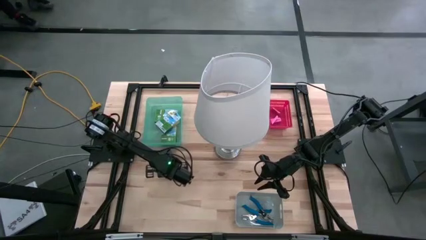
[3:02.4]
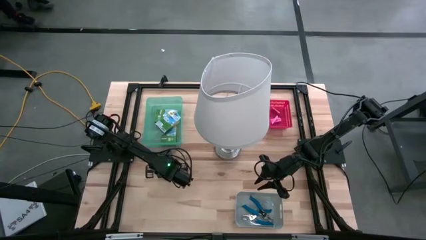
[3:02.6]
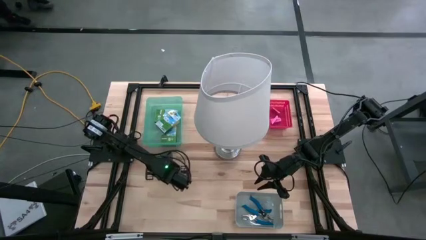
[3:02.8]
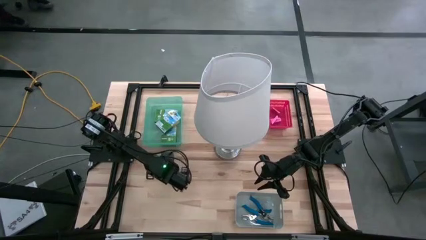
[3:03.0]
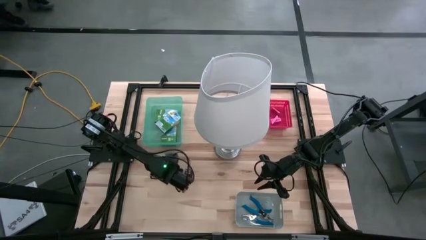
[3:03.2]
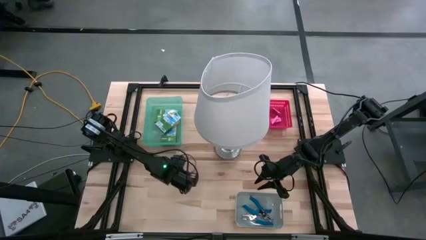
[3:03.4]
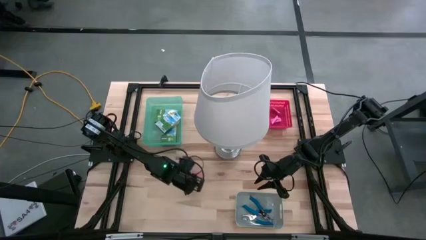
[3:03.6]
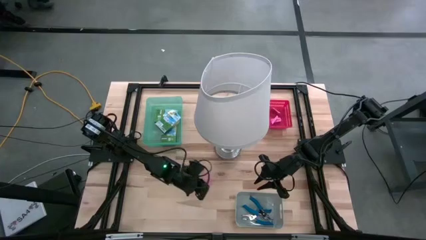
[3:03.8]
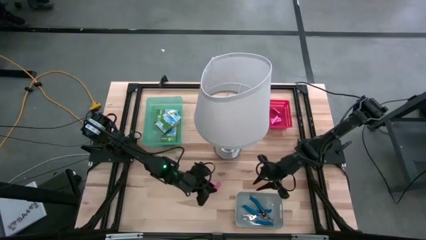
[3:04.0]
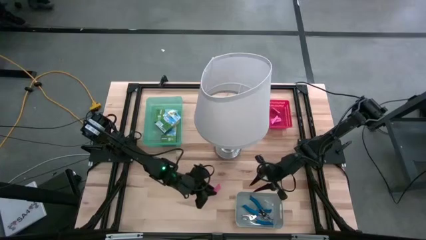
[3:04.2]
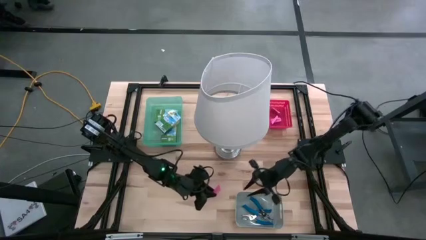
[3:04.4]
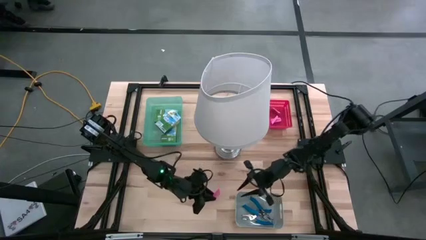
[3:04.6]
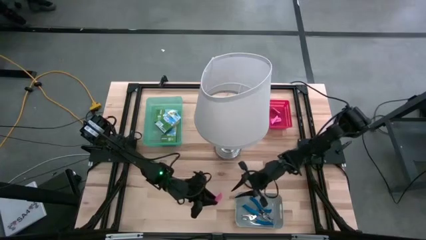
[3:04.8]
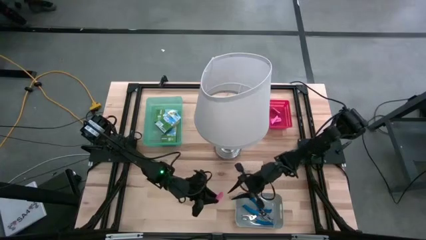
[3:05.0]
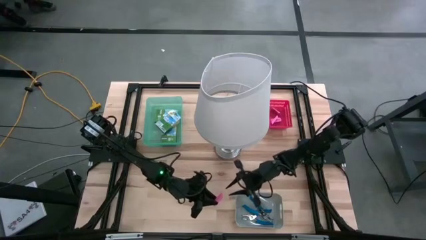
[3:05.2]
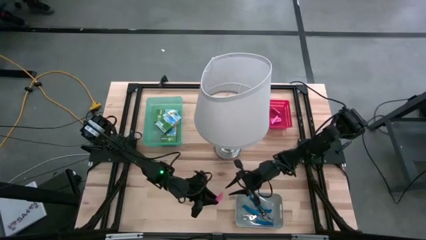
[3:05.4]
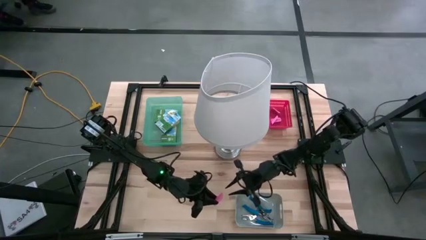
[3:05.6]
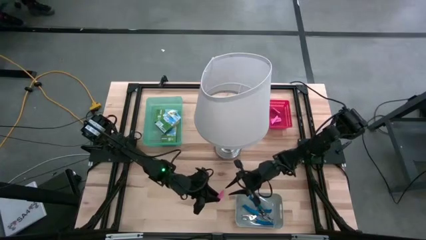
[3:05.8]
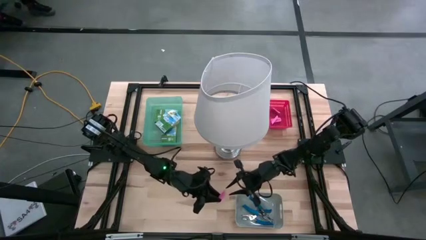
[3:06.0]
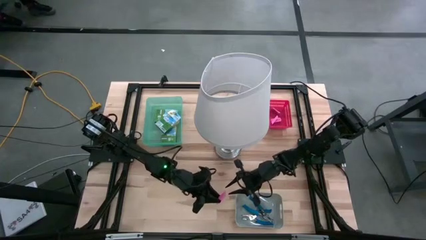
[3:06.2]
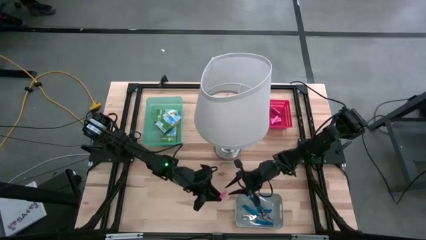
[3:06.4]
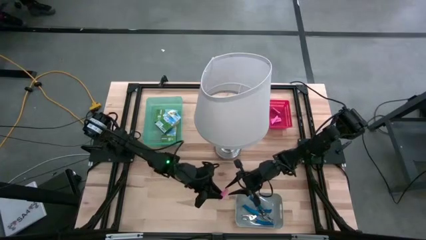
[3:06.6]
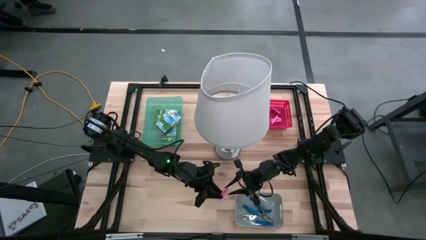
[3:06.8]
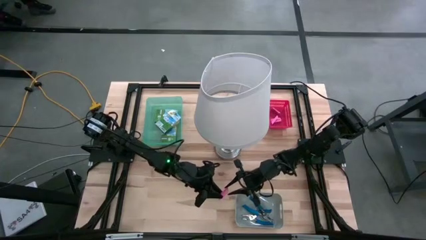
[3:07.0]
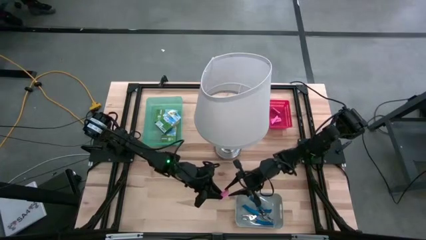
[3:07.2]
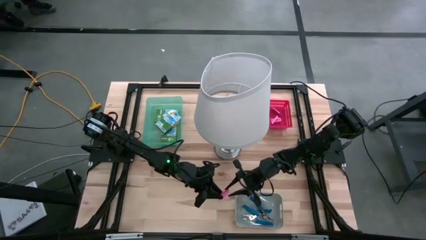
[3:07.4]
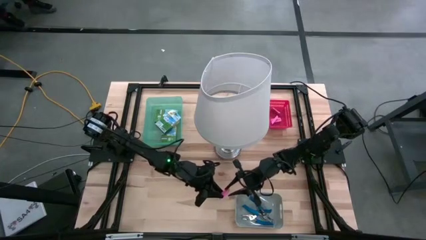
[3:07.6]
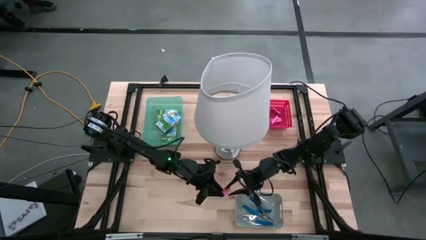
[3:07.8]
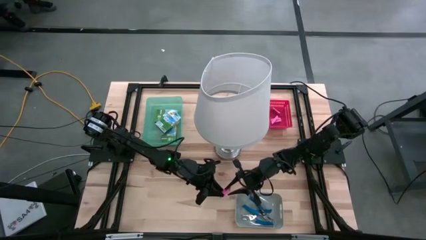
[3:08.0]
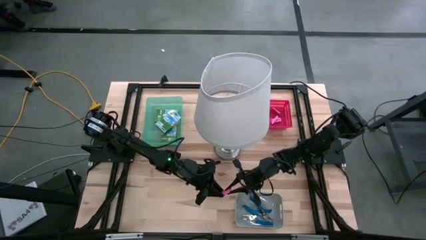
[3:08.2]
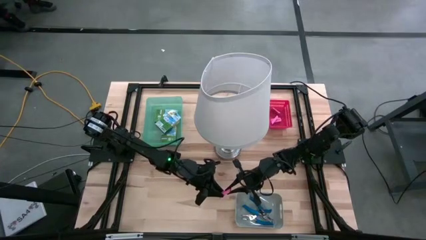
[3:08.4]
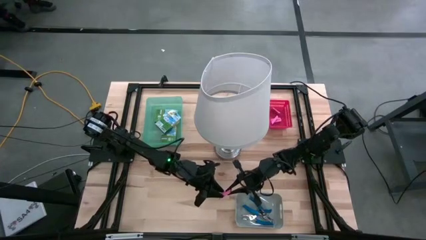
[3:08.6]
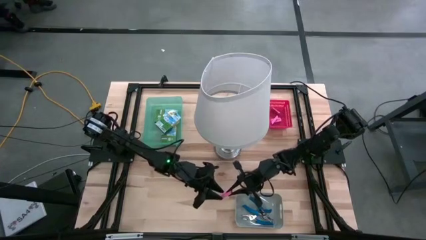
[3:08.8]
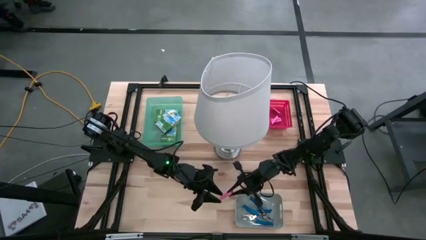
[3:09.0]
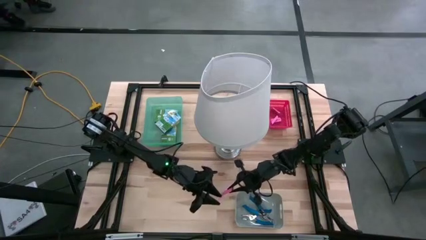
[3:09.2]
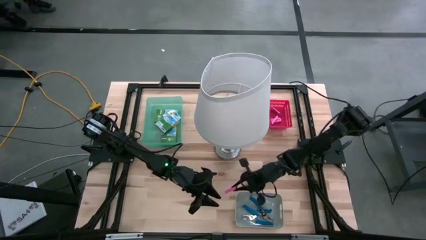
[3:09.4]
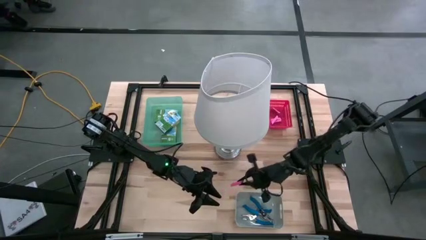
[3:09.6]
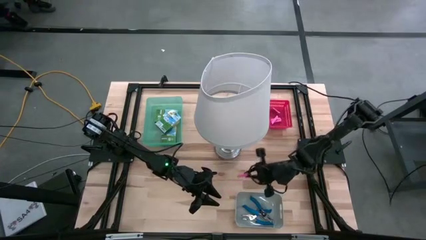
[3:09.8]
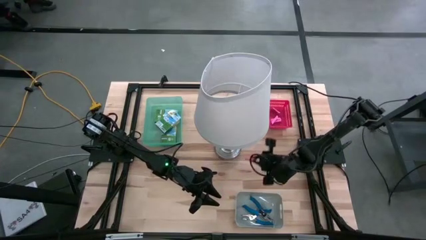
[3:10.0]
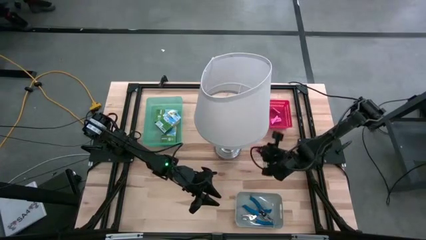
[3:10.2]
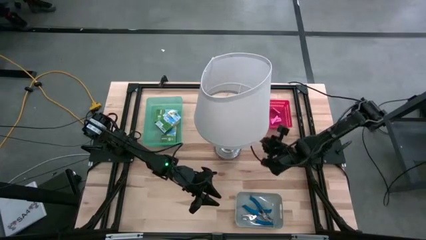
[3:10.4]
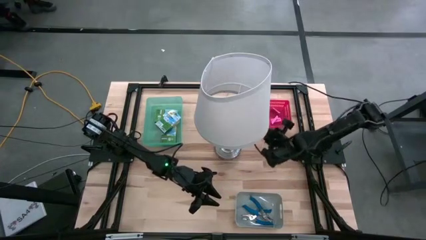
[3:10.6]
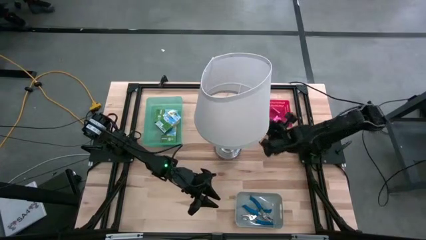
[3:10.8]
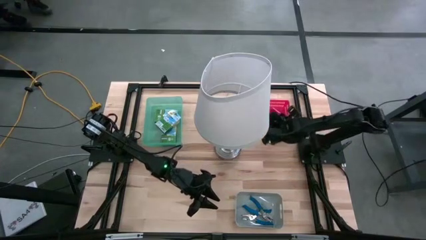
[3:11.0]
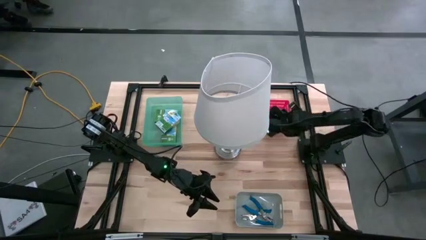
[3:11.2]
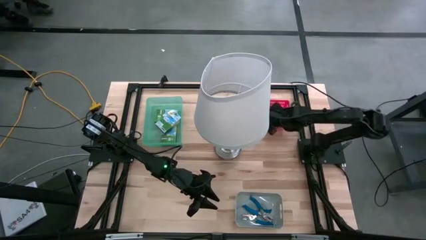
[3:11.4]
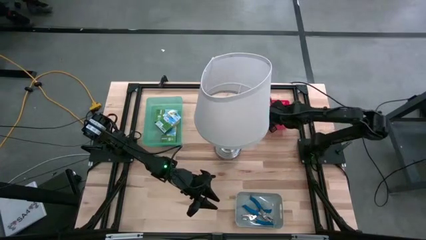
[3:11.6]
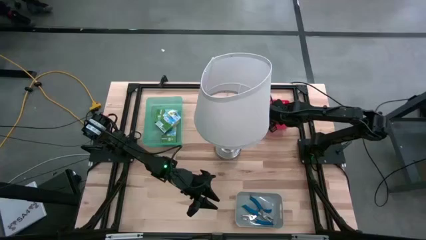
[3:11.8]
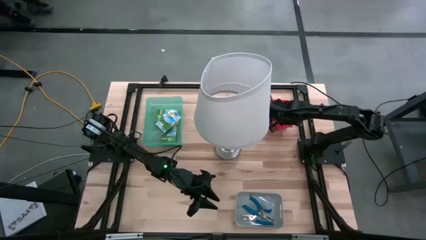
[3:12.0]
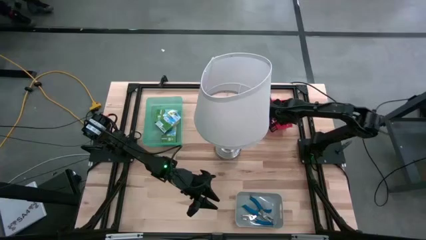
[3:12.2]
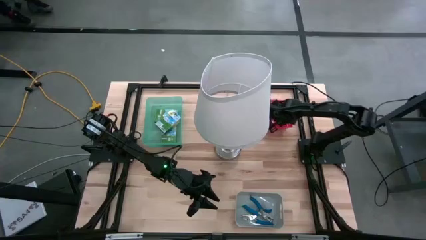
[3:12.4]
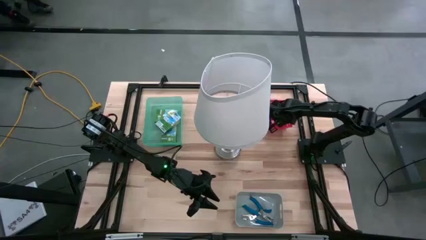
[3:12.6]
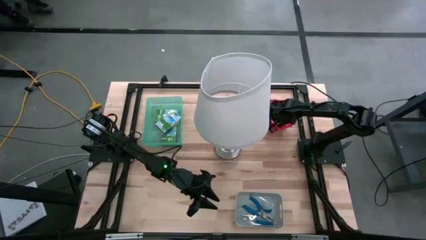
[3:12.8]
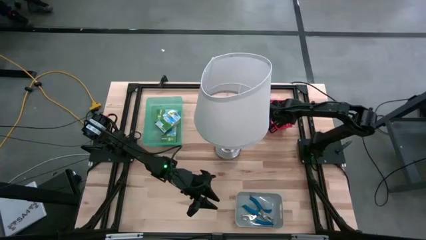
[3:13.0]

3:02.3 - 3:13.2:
Task: Pick & Place School Supplies
Put the pink eraser into the red bin

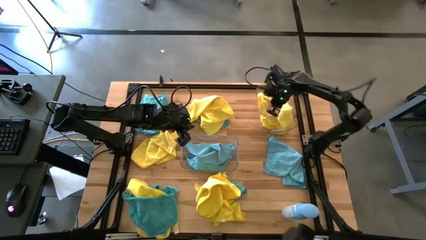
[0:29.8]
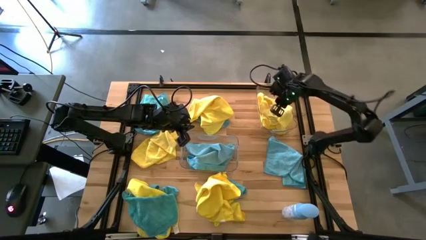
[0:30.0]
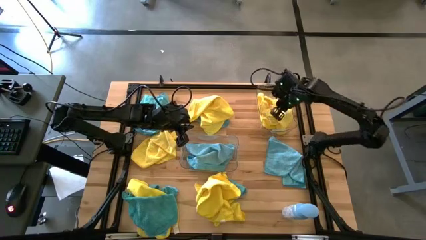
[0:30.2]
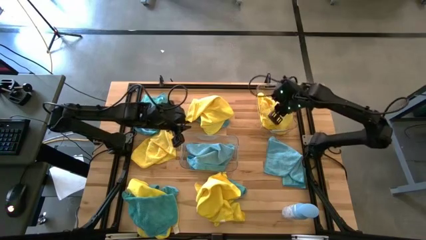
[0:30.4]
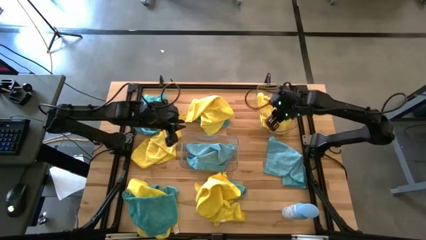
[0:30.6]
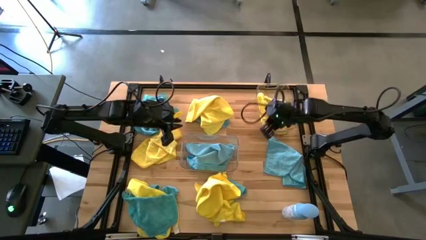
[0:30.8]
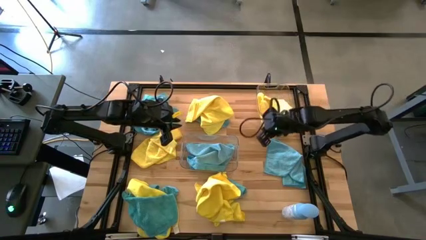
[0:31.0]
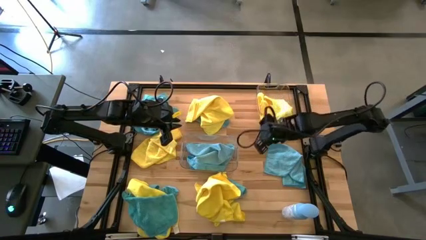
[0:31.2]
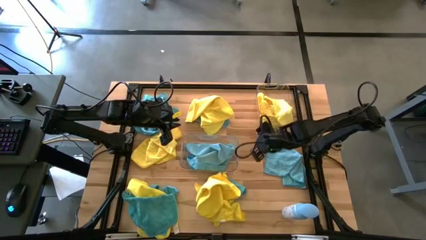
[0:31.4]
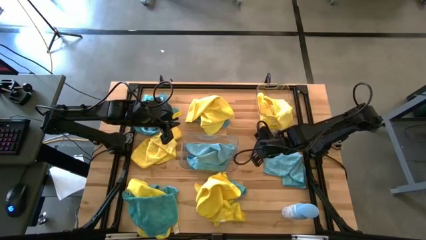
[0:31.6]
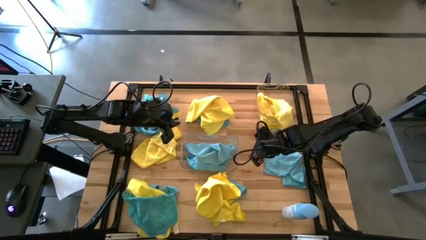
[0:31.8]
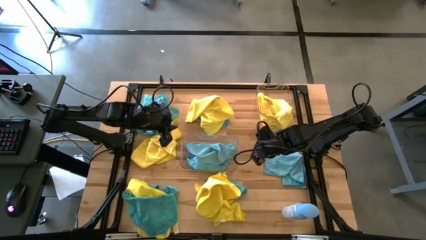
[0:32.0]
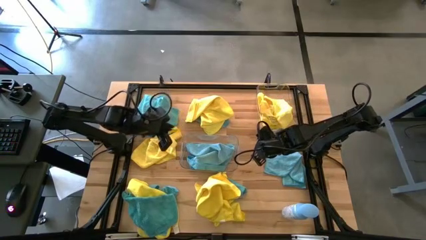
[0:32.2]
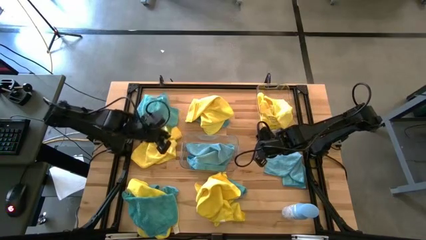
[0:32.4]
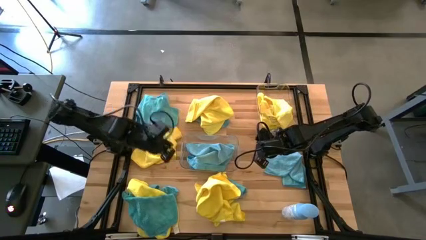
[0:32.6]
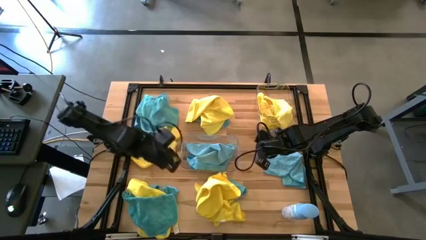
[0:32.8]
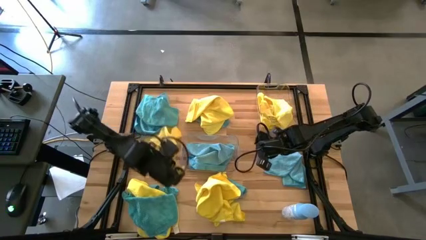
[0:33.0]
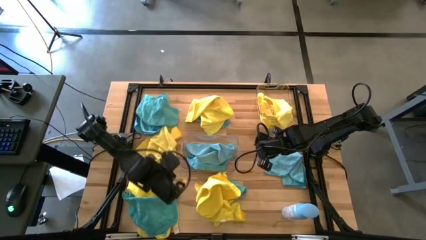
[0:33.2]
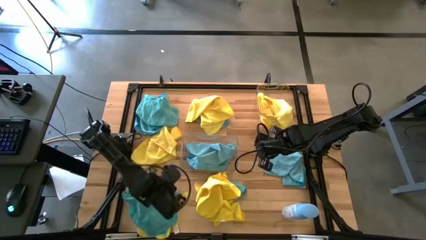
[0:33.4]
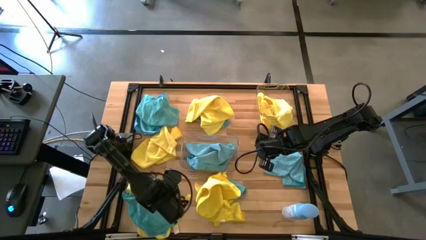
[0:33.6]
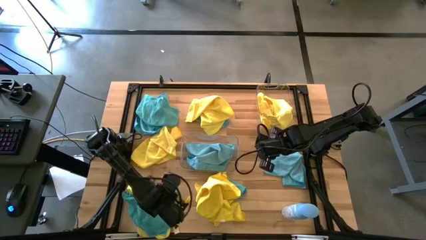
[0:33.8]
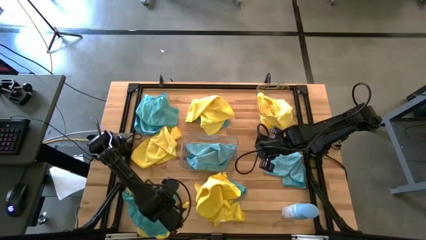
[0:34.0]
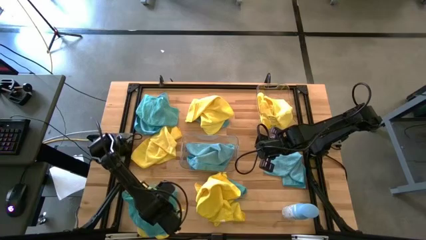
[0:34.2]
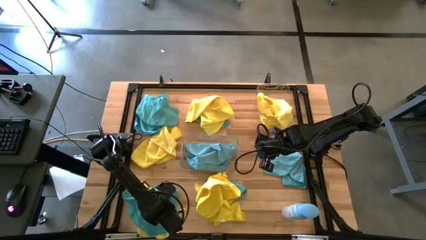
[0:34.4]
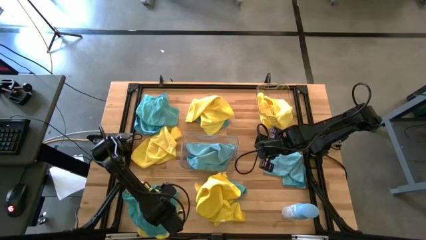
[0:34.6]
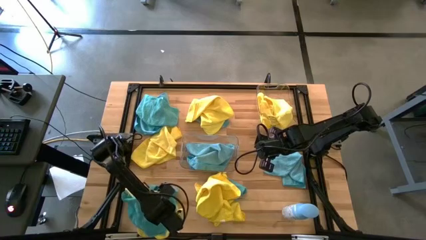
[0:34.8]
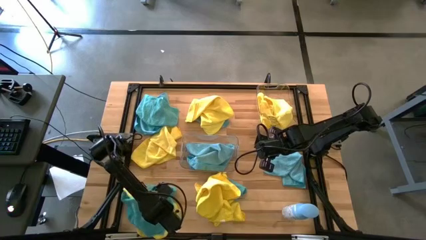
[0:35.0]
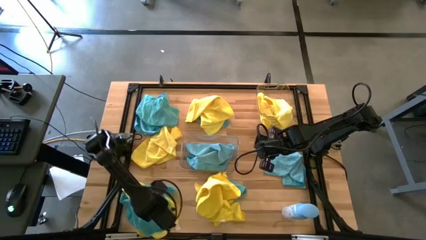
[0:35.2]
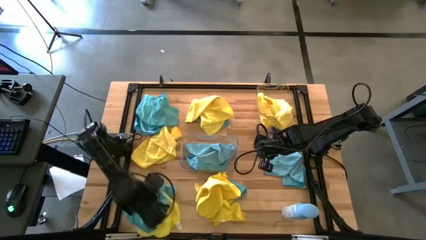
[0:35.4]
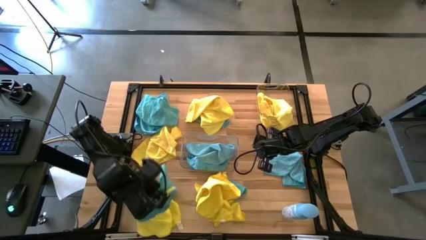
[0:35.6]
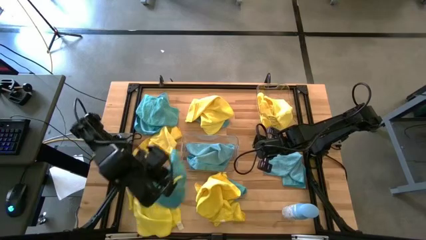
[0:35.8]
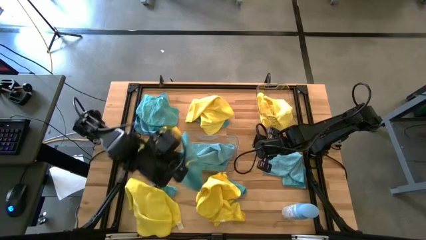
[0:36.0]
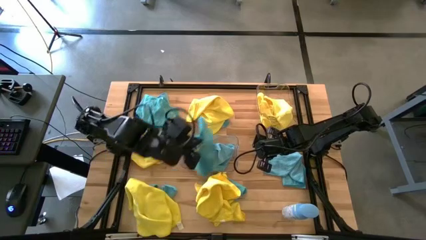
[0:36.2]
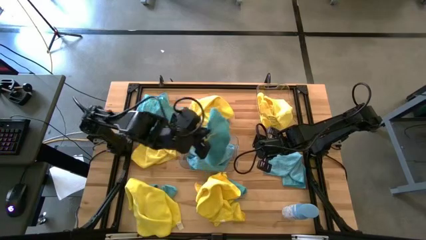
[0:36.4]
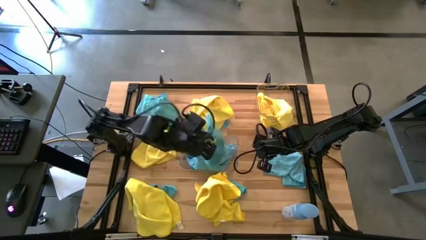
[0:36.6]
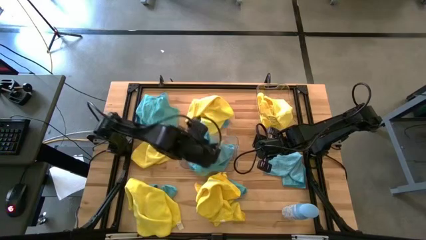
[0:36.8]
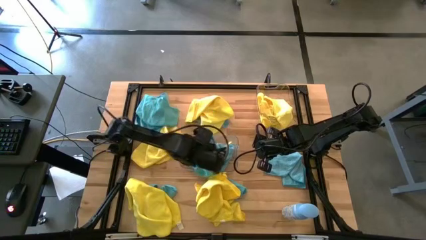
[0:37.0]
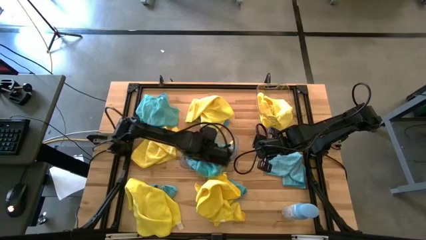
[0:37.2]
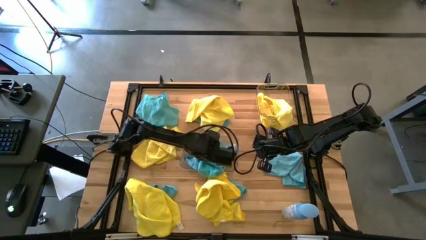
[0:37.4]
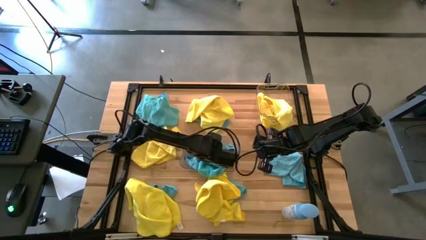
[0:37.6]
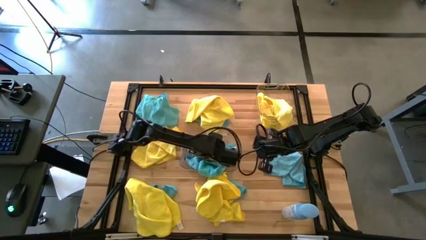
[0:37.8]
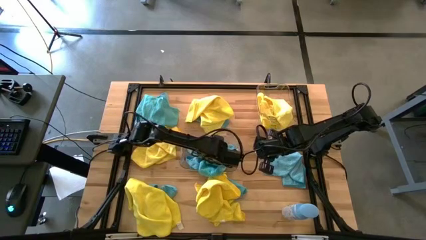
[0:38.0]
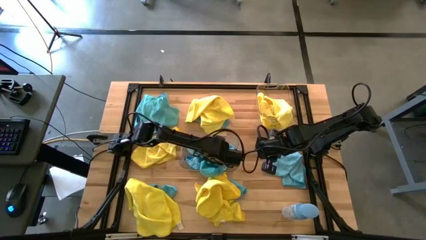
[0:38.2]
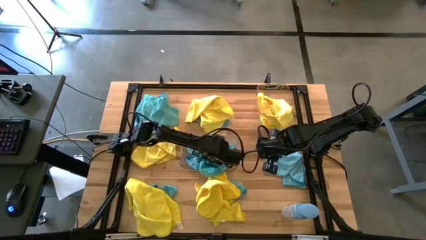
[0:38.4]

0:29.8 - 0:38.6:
Task: Sort microfiber towel by color & place in baskets
Put the blue towel into the bottom transparent bin
